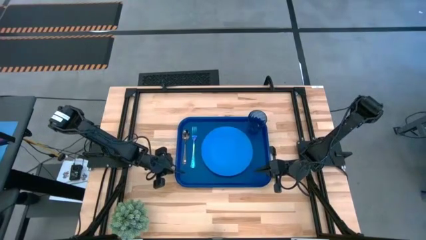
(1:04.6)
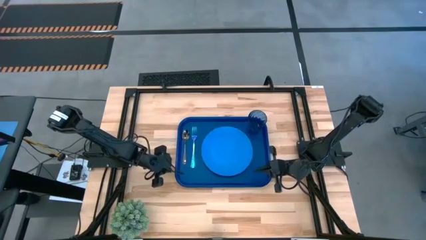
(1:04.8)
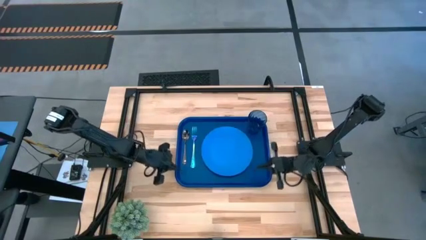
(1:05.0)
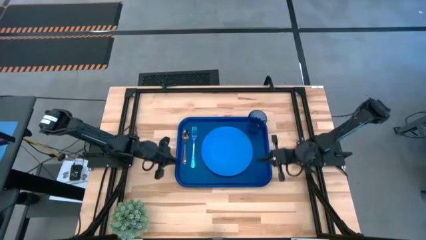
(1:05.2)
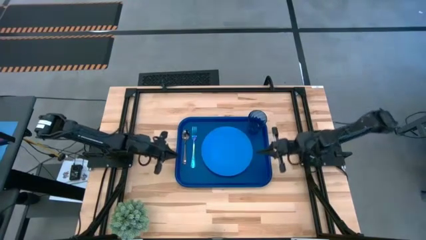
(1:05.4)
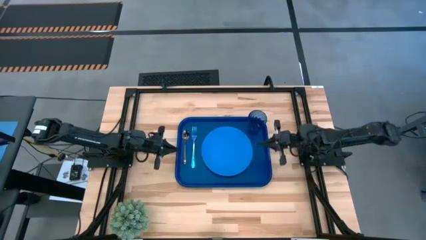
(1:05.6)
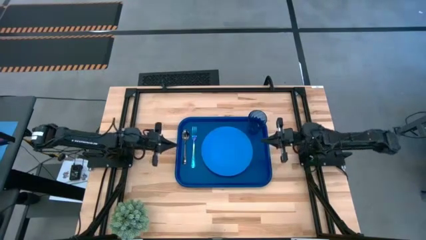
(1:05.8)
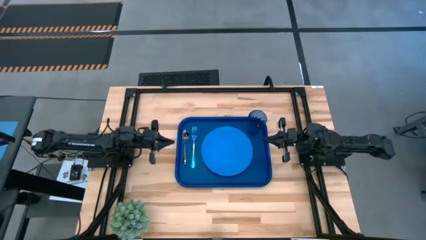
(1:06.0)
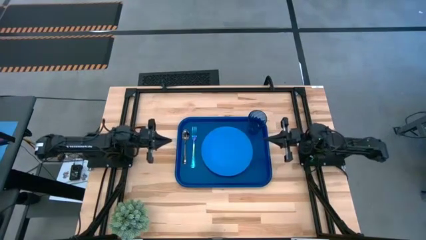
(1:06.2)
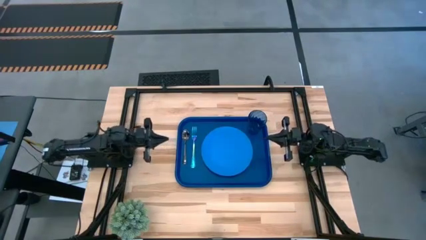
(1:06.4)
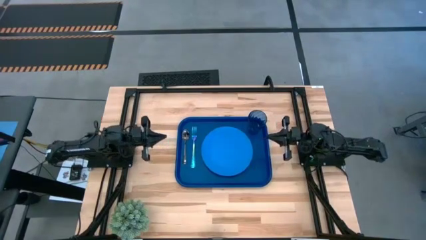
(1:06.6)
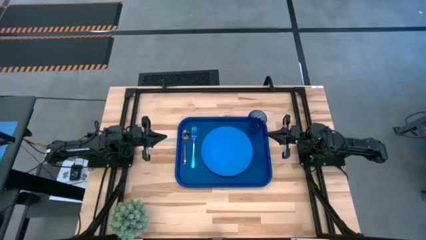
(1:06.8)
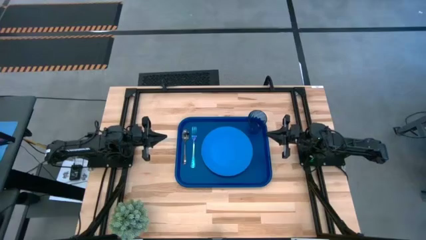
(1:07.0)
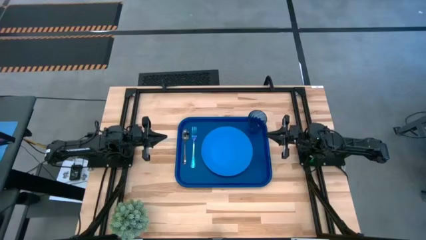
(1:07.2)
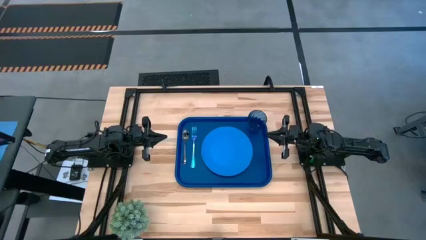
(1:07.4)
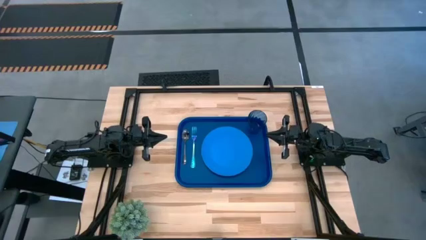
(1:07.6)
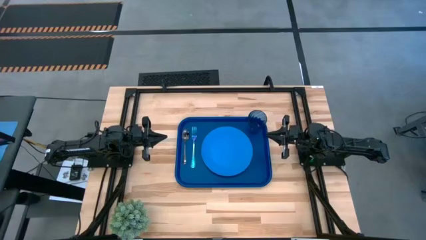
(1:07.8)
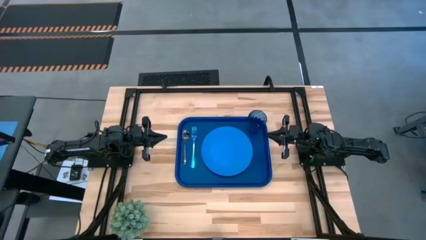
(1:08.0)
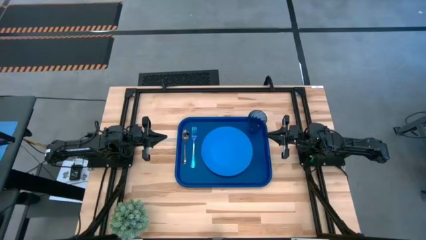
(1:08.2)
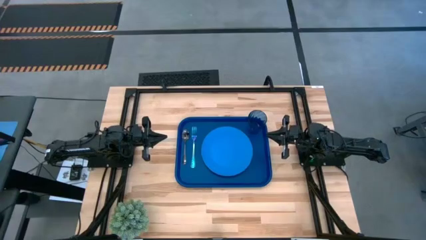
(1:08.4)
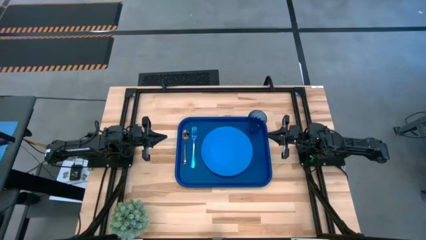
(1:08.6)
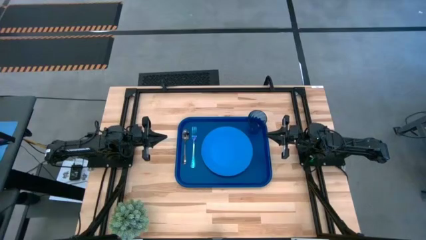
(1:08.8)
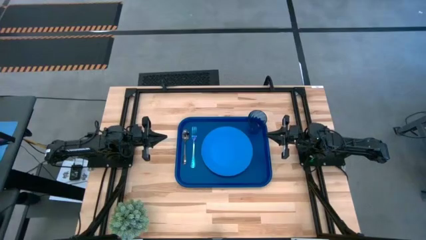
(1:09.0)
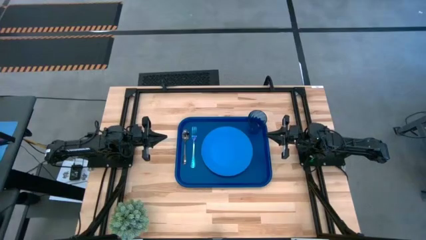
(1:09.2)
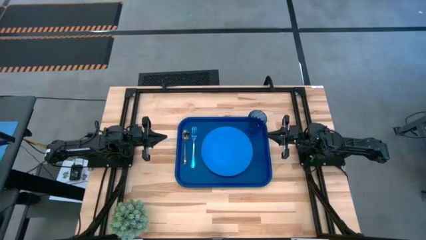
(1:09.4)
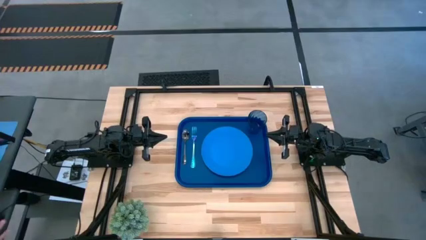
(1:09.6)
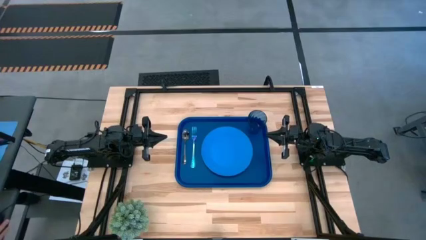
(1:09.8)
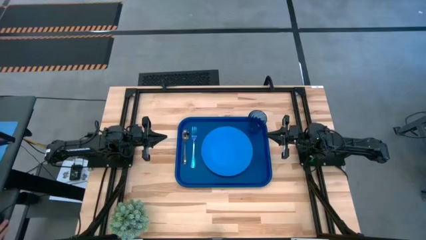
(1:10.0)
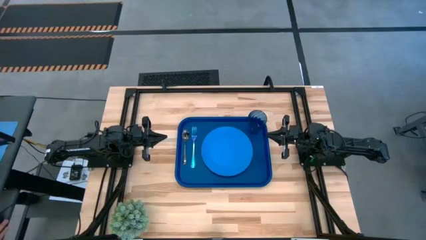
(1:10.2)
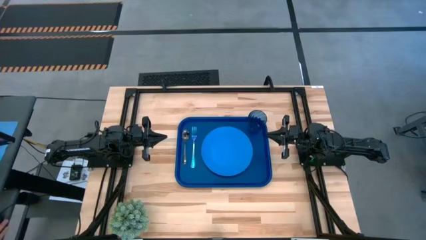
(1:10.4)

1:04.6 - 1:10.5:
Task: Pick and place plate/cup/fork/spoon on tray
Return to Home Position

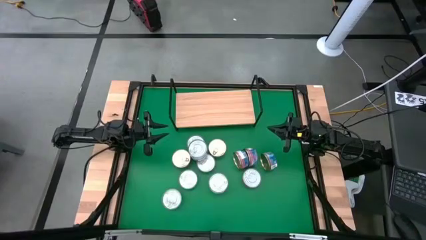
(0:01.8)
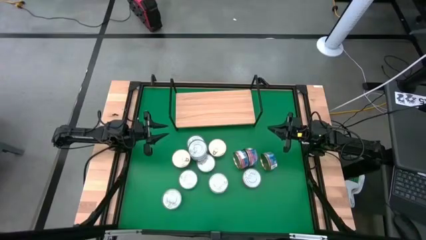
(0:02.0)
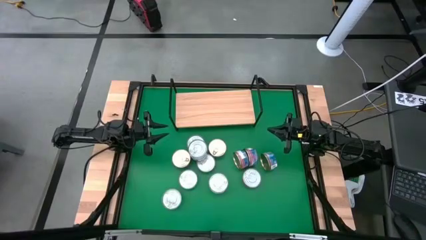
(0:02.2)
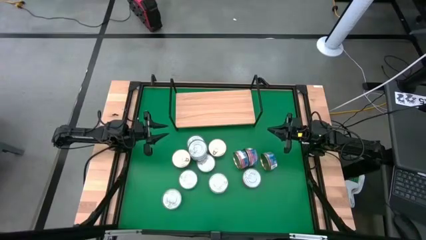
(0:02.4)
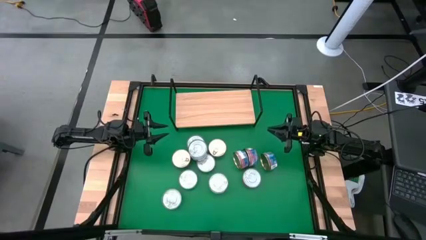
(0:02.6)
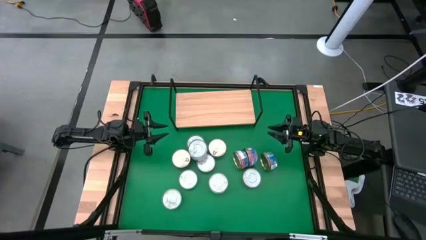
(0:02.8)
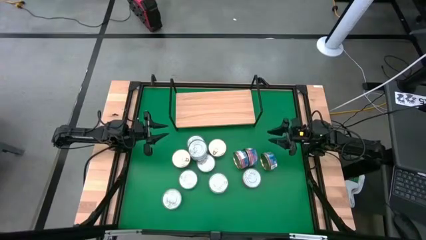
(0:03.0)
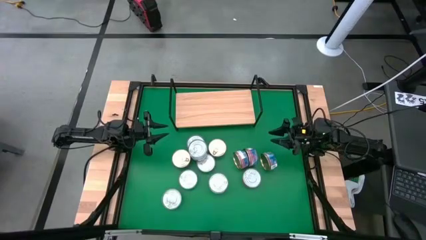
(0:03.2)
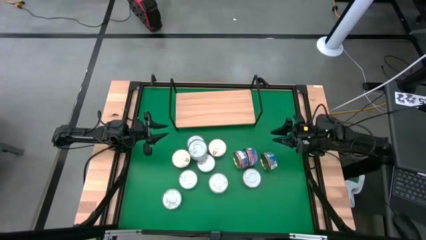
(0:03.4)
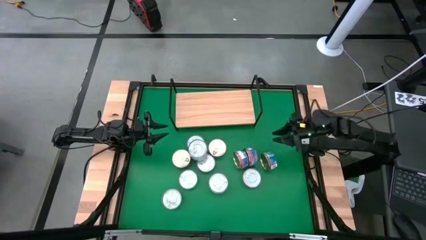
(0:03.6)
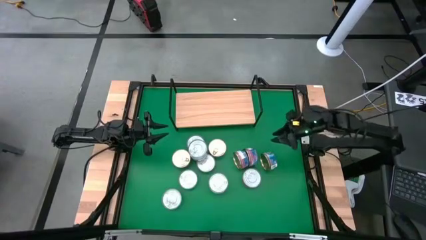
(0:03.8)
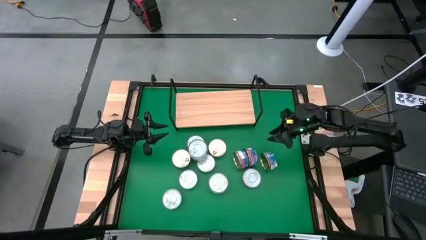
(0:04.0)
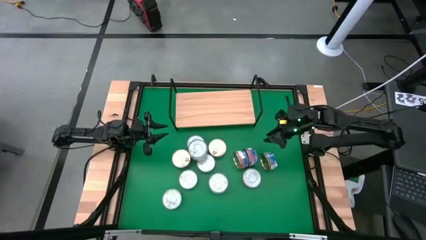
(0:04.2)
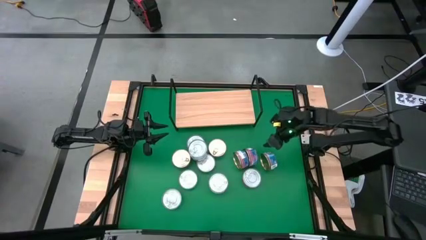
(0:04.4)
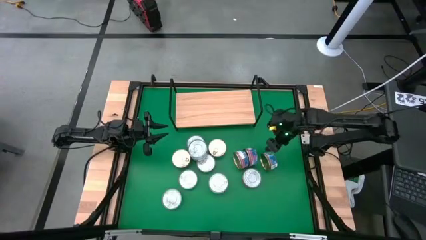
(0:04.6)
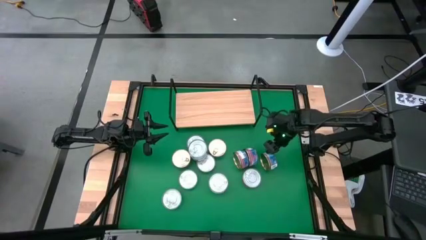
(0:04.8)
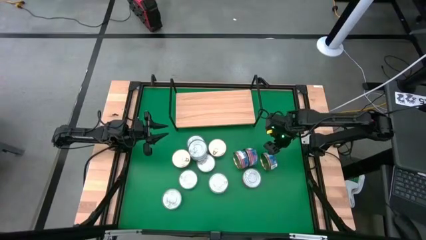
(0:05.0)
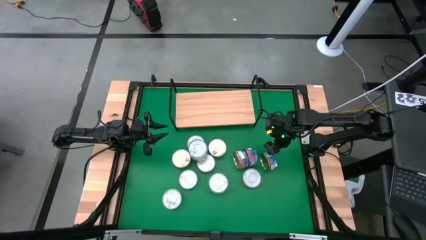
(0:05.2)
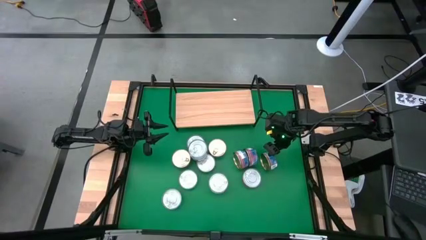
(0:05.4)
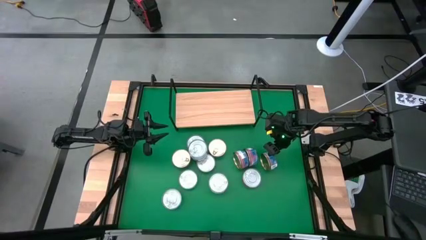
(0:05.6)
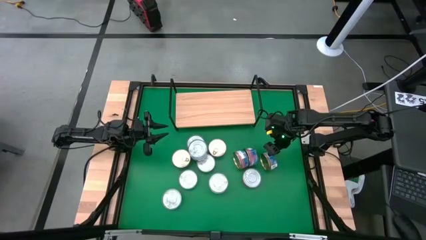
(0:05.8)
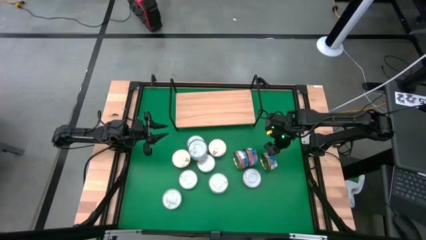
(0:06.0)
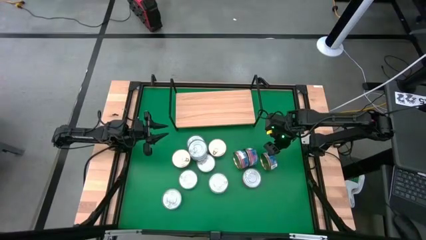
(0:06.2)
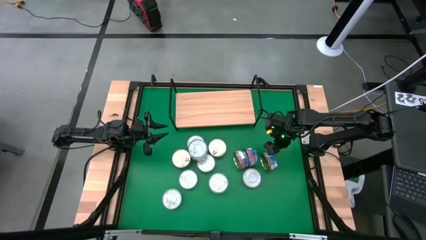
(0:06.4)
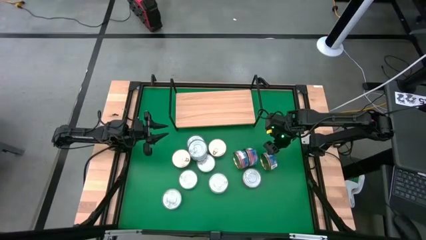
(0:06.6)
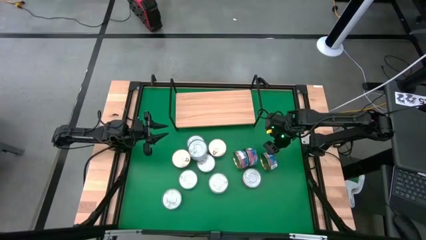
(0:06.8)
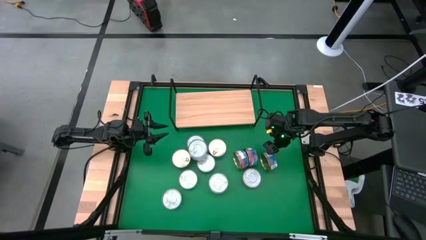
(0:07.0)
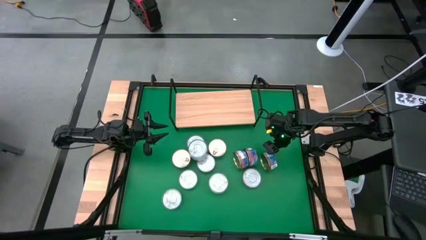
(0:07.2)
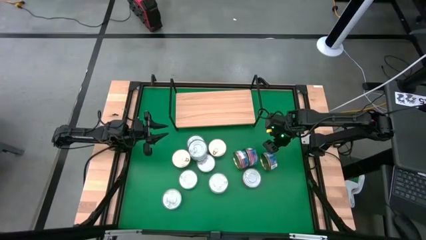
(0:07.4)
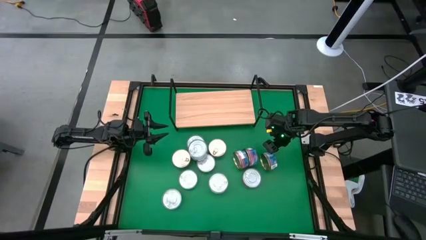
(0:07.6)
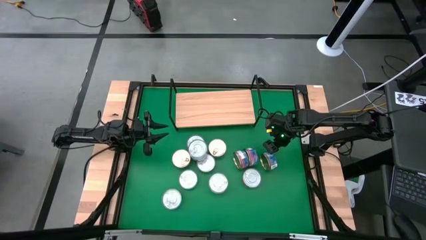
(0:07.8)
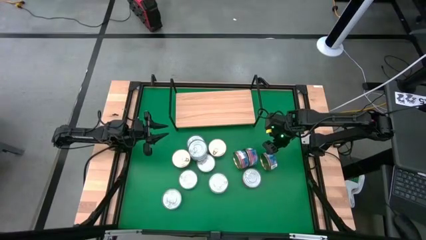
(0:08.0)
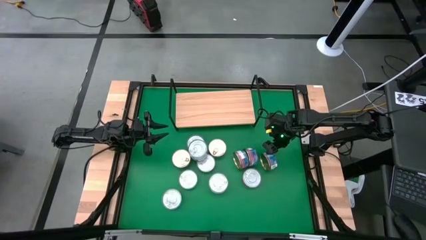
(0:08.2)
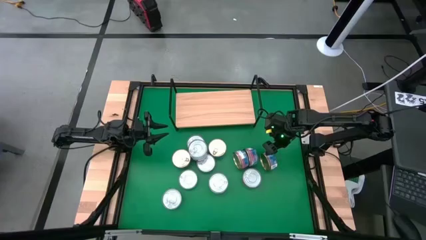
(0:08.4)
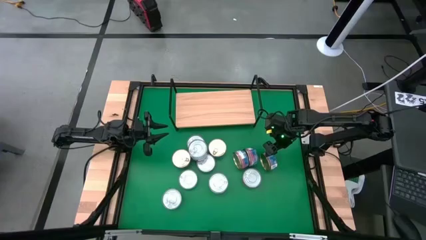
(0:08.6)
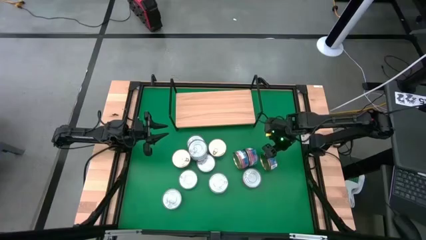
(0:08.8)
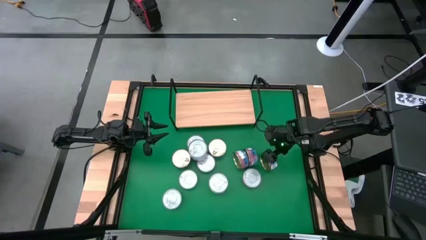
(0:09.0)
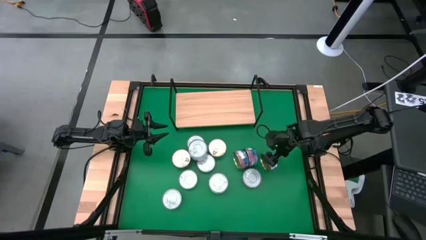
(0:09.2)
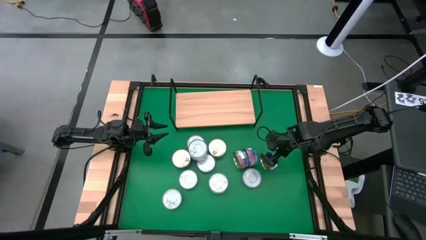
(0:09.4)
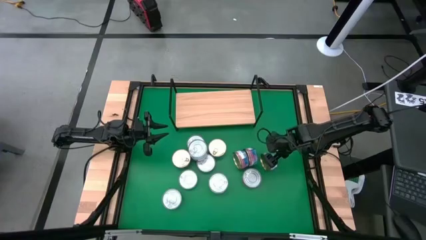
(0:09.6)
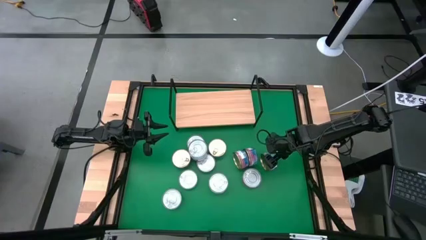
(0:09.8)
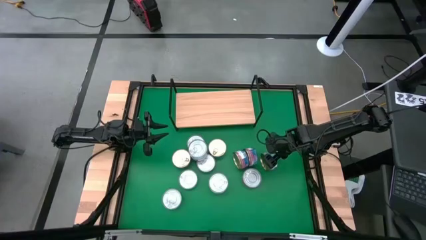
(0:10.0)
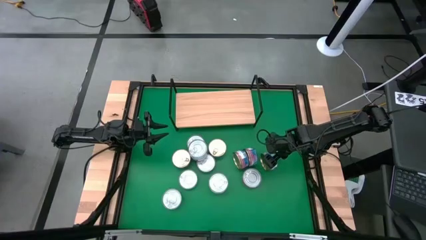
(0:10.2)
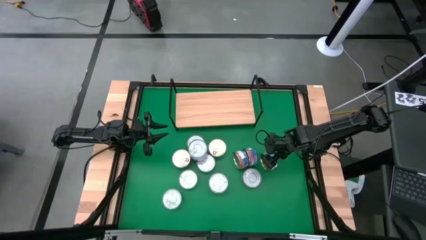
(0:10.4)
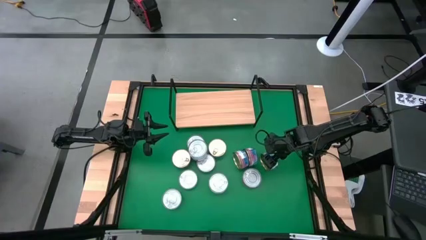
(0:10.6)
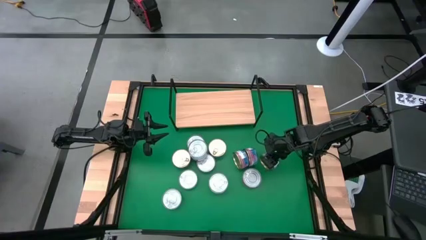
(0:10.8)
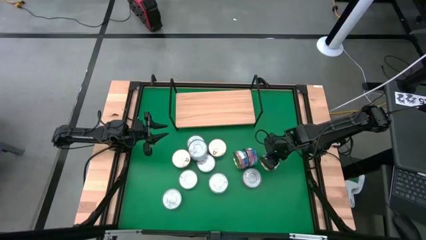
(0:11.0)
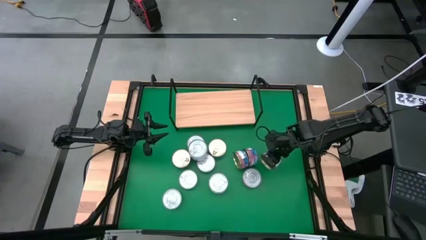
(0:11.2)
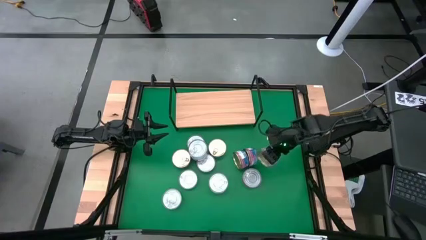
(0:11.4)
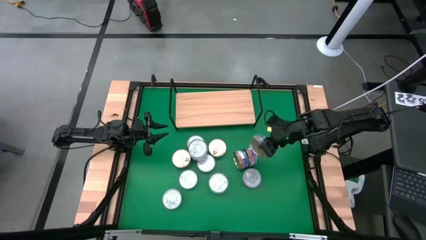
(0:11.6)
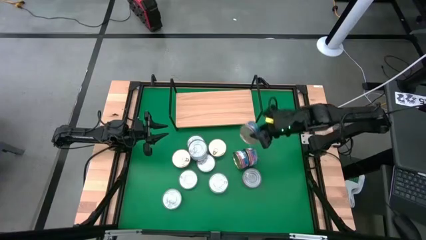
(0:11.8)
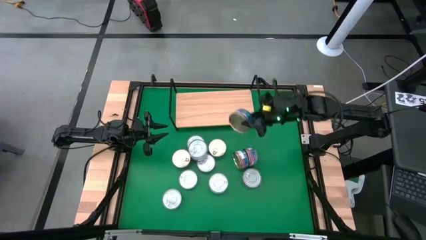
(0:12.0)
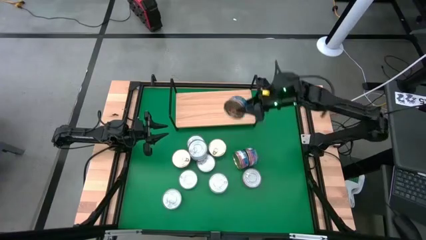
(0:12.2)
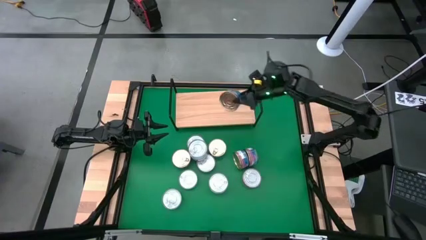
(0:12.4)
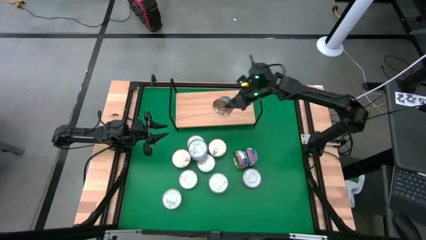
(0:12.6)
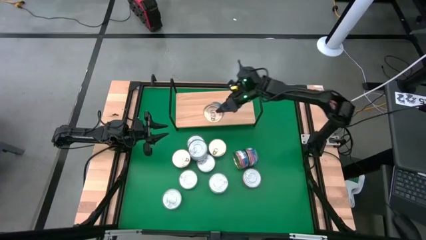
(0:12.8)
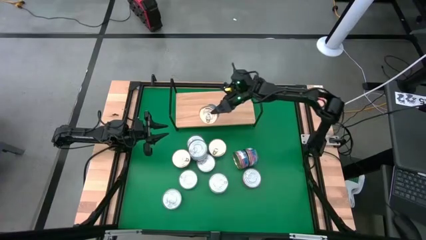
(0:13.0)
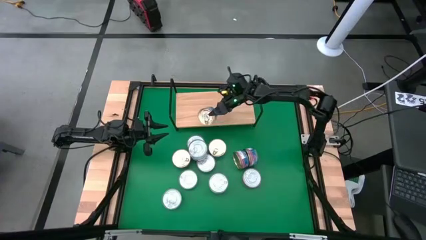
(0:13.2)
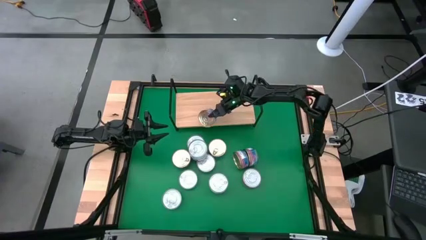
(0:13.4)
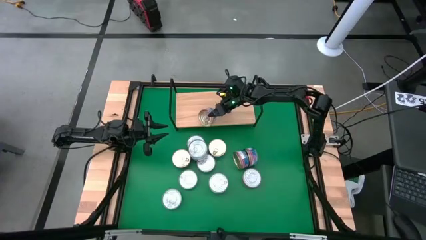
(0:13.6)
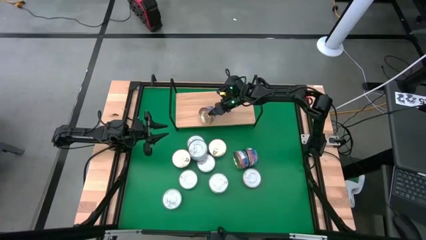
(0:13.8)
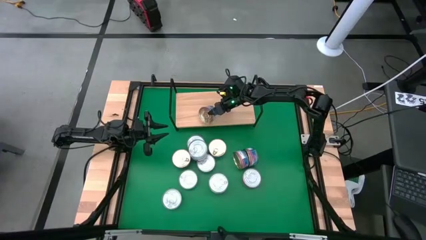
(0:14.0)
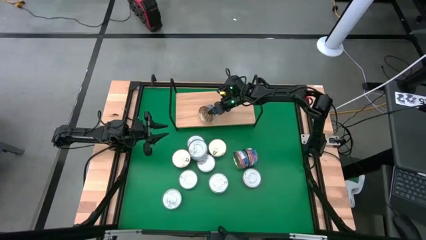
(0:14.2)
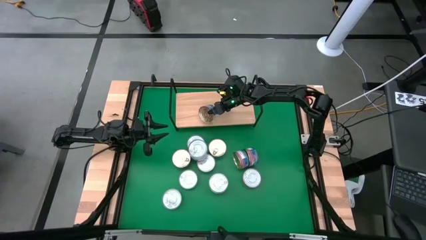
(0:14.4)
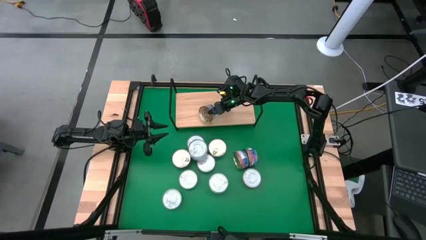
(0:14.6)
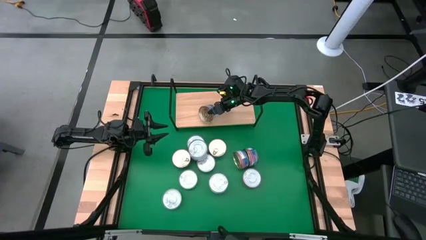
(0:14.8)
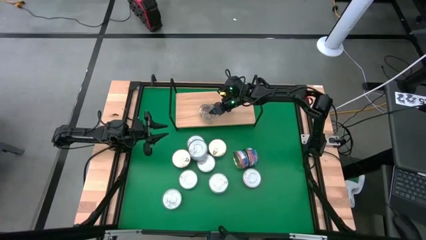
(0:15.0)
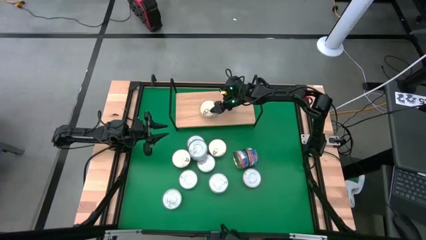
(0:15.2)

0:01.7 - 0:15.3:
Task: Stack canned seafood by type on shelf
Put the blue-pink tuna can on the shelf
